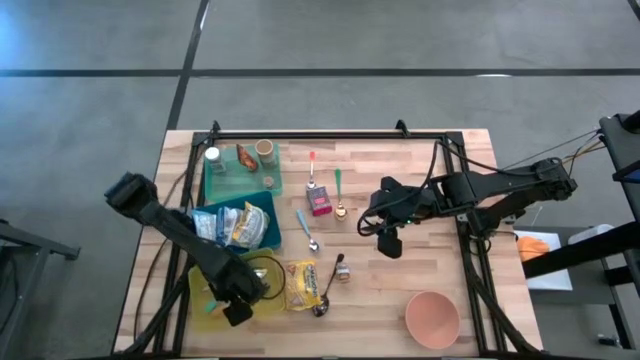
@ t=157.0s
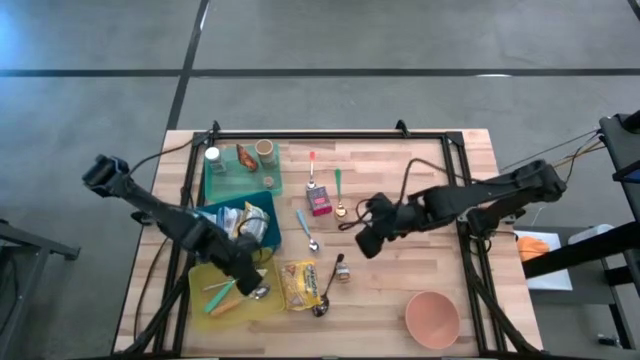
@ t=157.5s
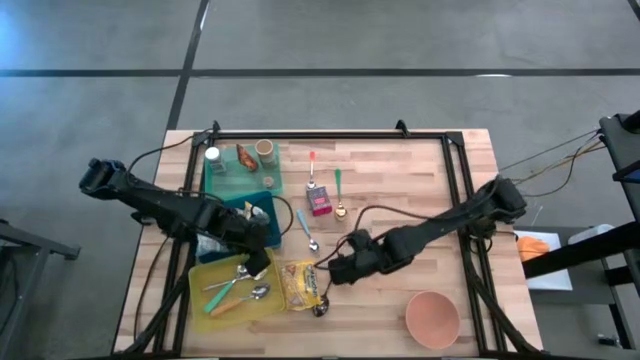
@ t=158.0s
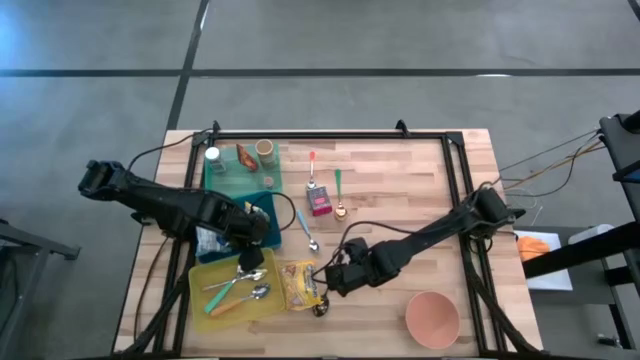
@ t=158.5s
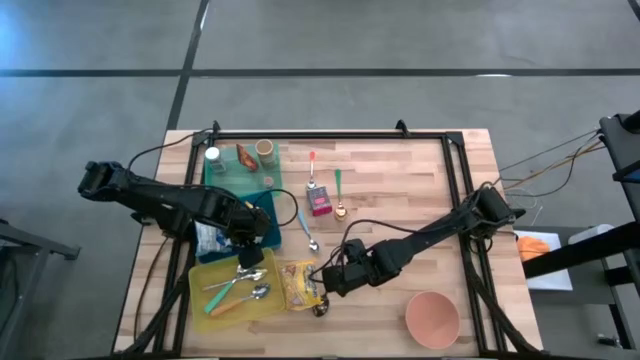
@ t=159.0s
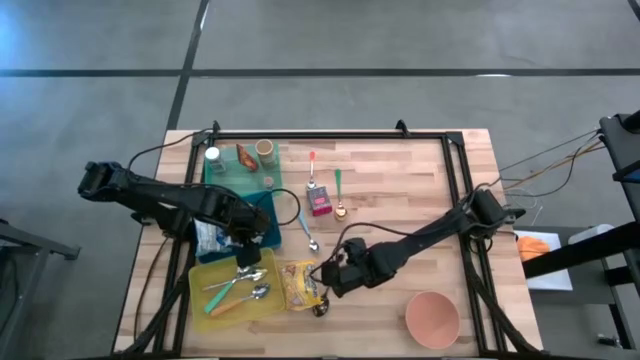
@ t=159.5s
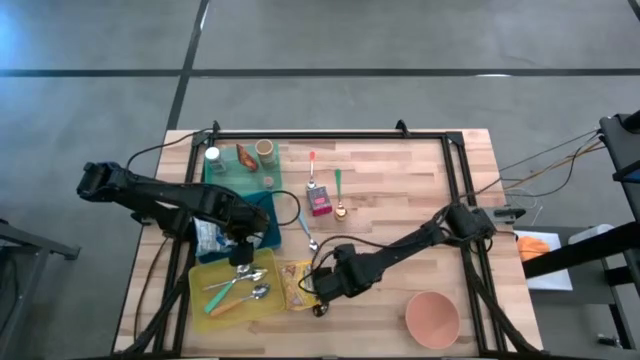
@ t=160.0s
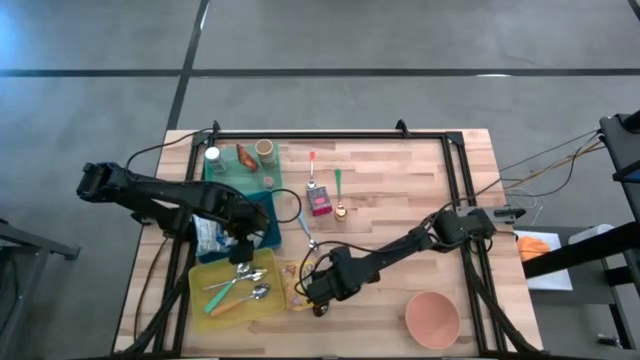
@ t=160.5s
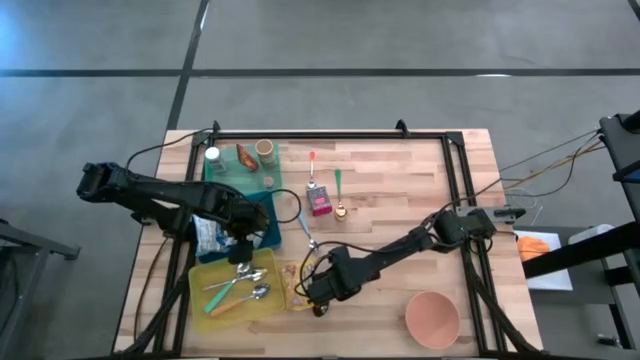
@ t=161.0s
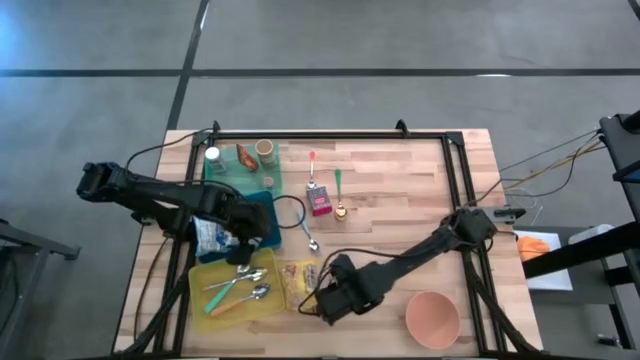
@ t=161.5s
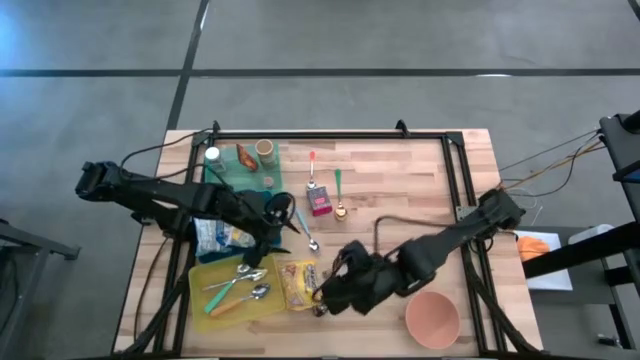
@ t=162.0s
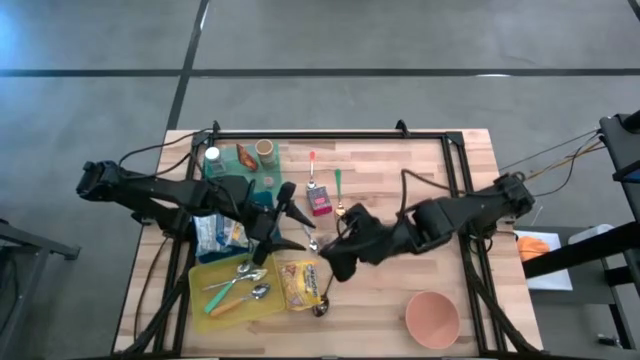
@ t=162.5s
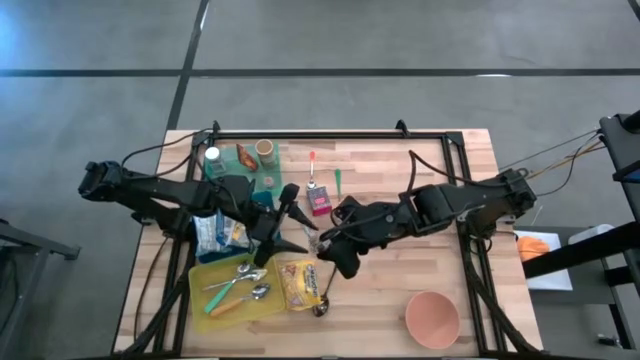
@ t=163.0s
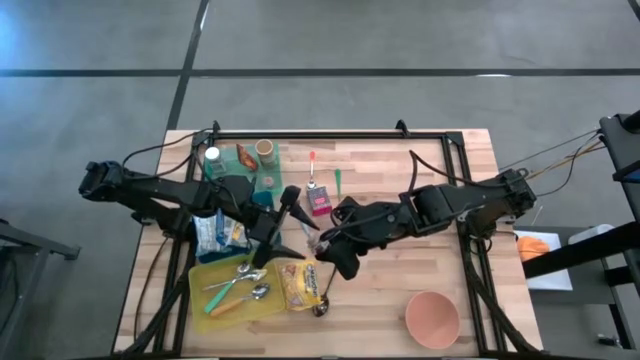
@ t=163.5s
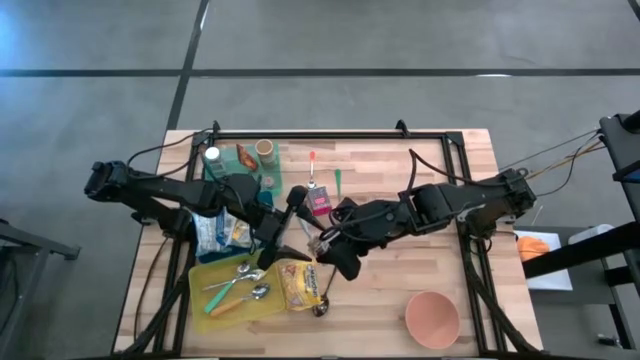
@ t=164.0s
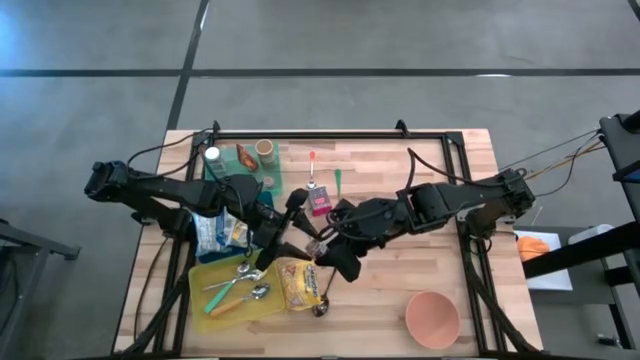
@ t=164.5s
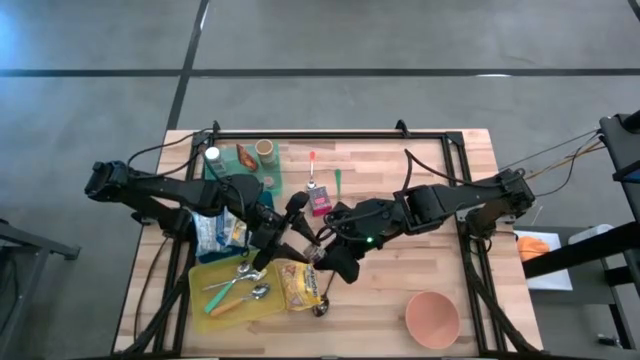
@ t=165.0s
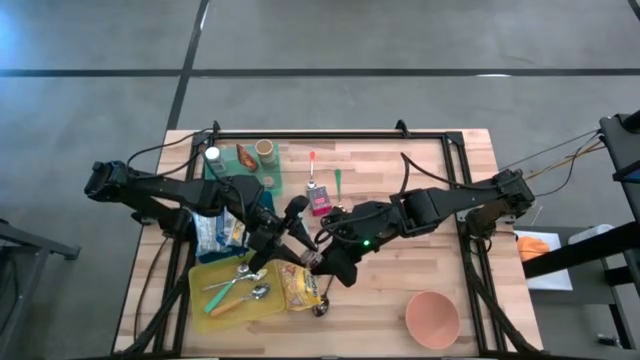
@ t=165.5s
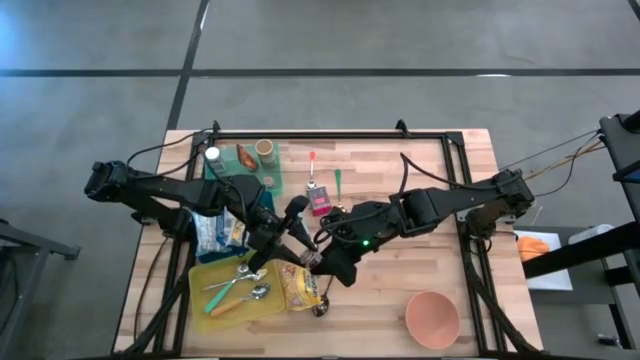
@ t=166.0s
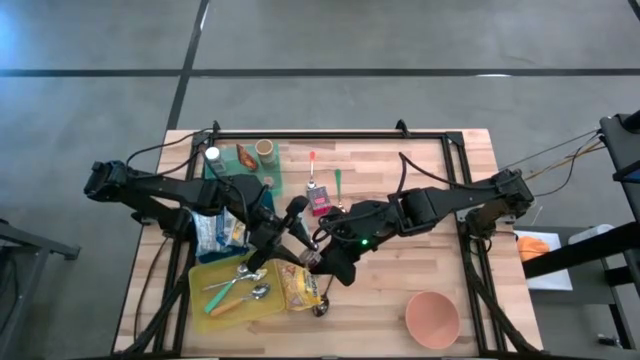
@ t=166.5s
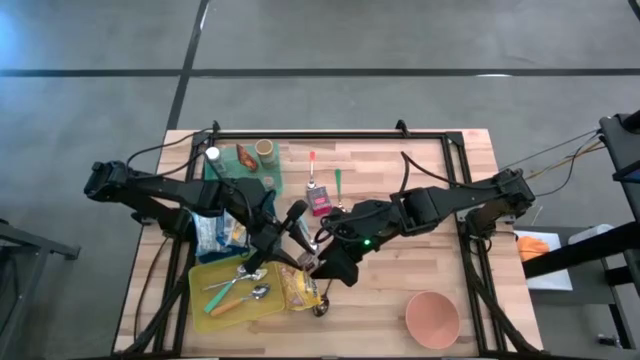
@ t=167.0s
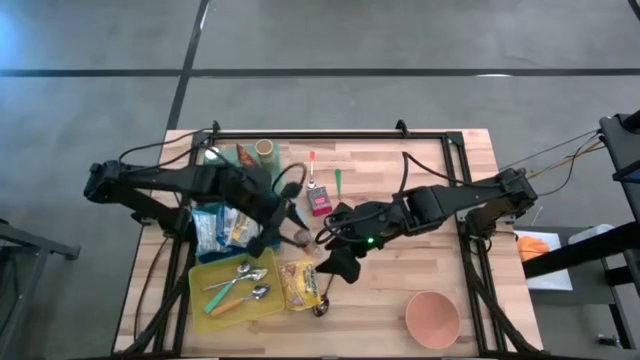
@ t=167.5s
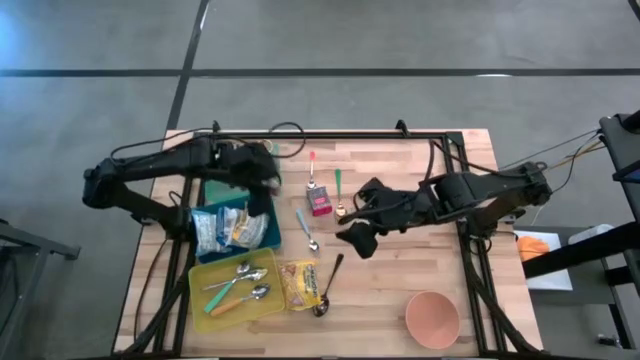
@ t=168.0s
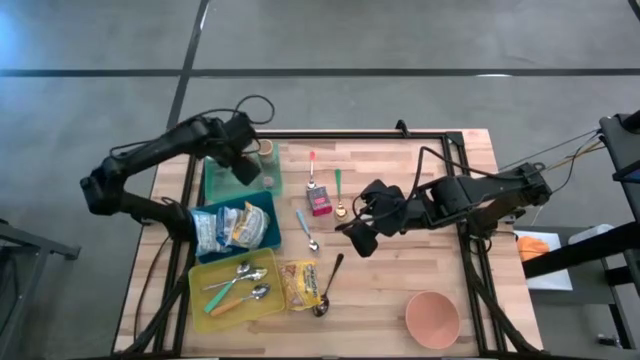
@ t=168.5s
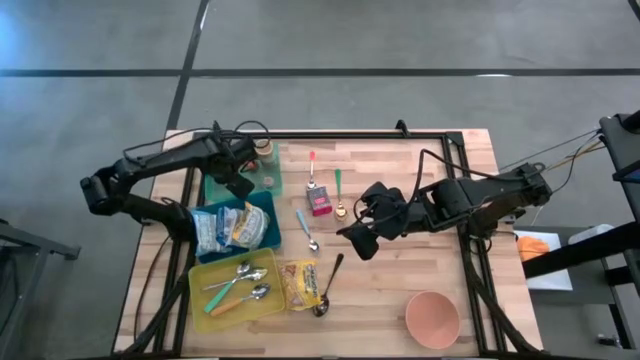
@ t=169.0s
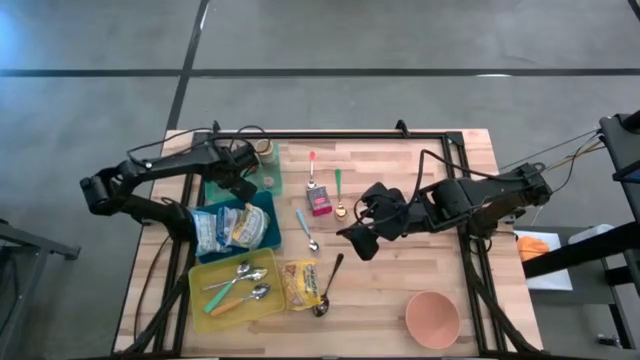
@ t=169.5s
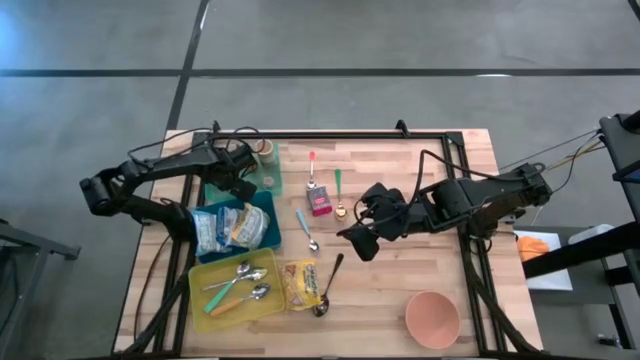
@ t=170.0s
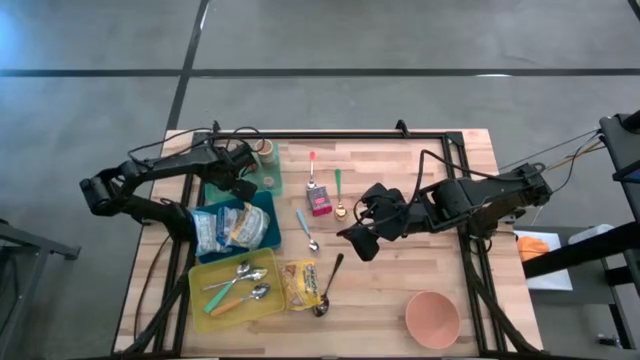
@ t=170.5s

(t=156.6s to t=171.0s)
Put the brown seasoning bottle into the light blue bin

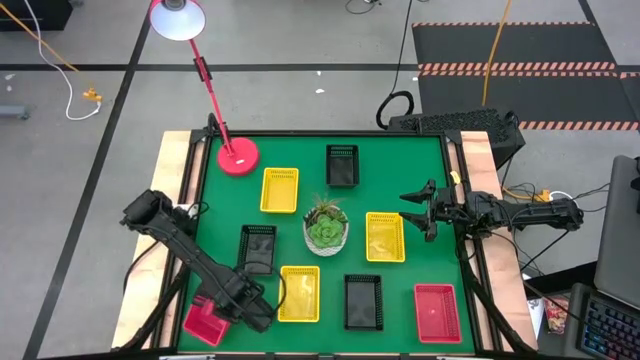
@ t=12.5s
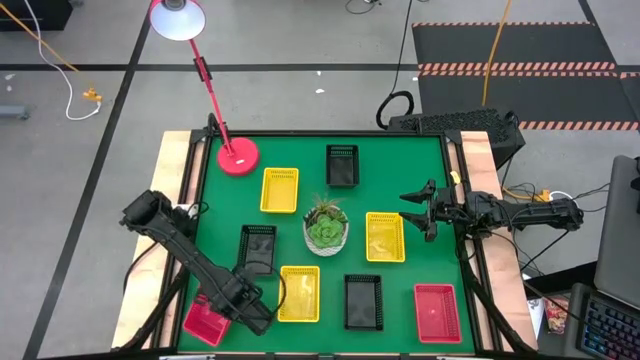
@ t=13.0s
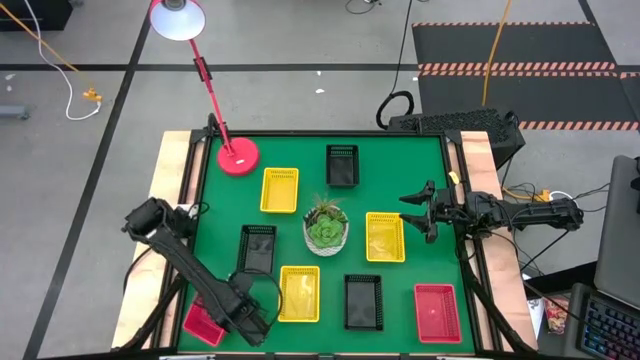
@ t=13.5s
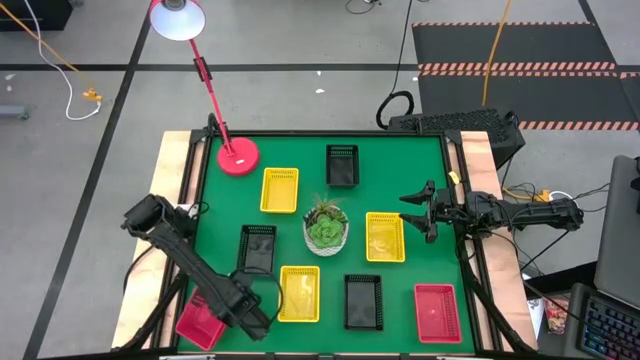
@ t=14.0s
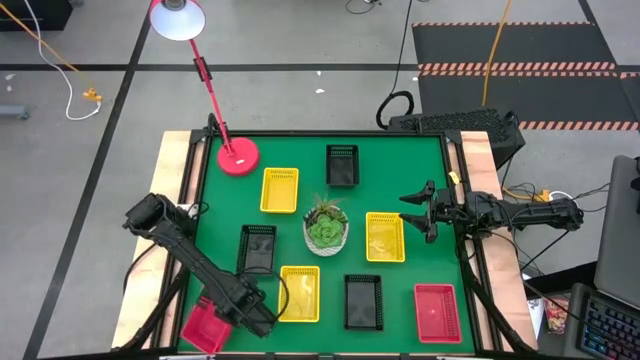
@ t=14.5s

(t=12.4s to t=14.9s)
Stack the top red bin on top of the bottom left red bin

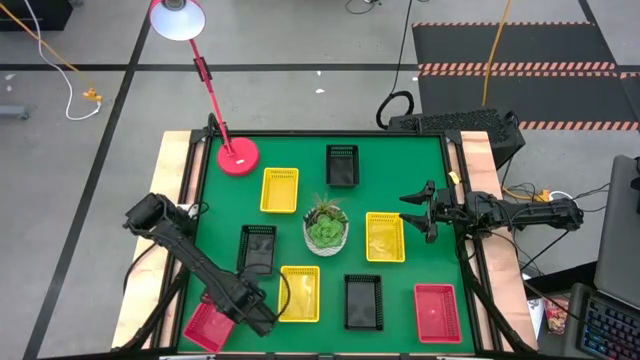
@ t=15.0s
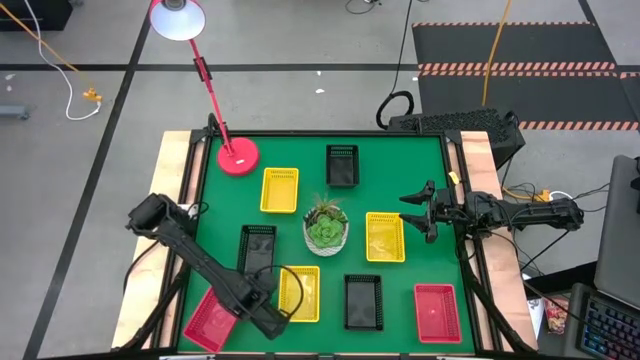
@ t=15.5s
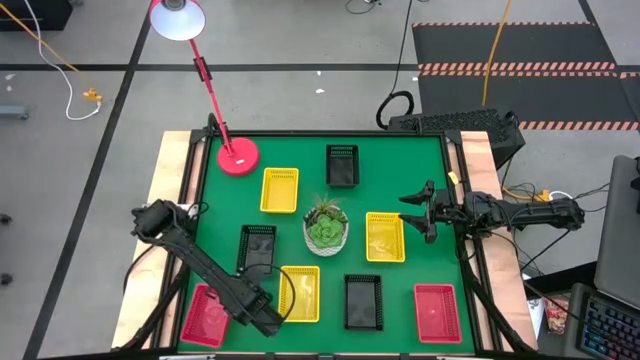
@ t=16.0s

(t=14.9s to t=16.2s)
Adjust the stacked red bins
